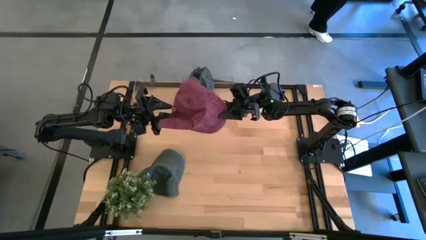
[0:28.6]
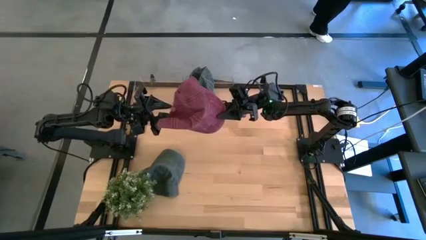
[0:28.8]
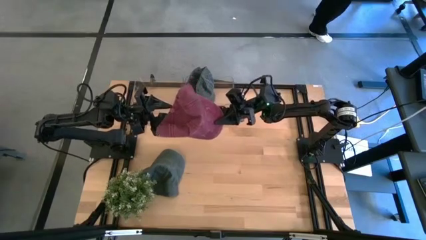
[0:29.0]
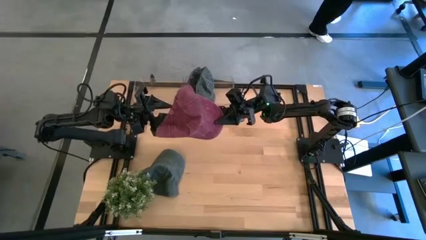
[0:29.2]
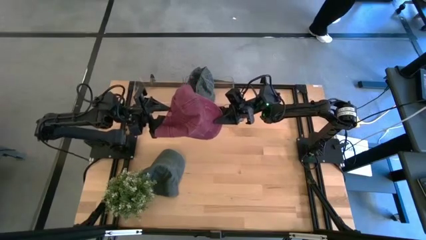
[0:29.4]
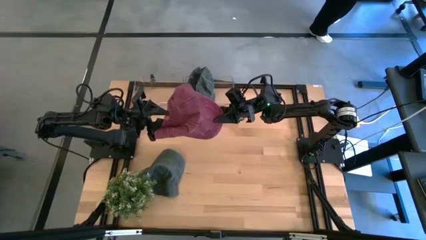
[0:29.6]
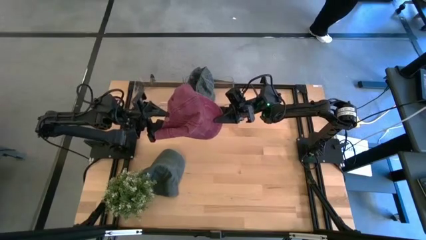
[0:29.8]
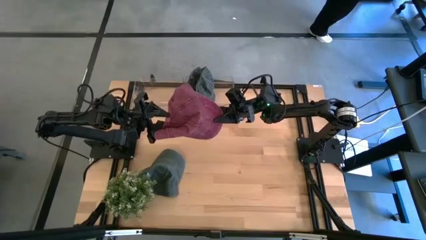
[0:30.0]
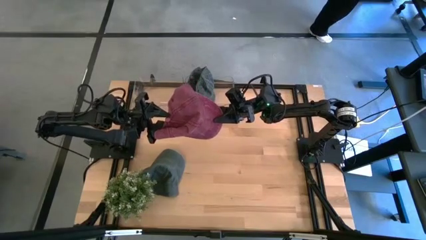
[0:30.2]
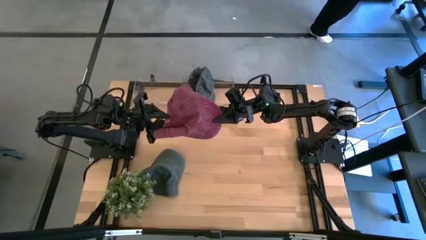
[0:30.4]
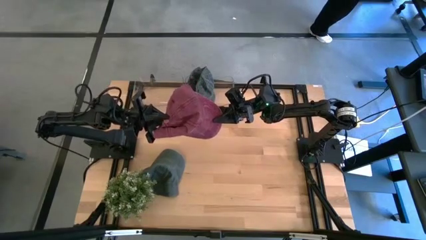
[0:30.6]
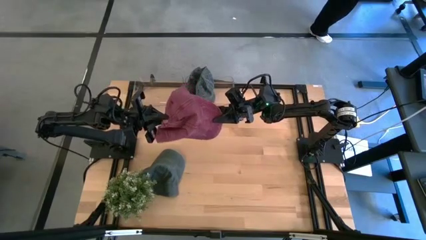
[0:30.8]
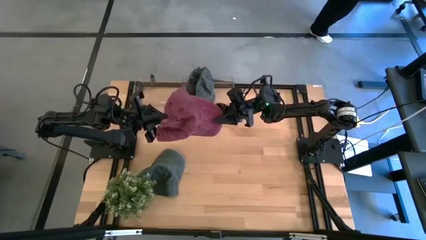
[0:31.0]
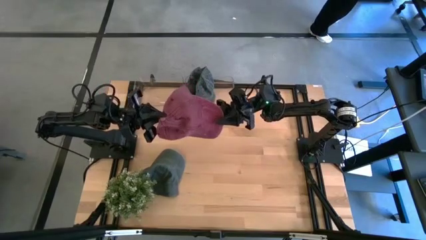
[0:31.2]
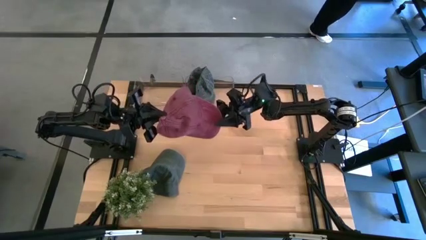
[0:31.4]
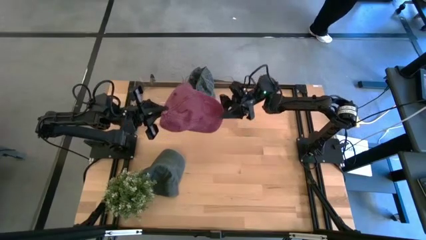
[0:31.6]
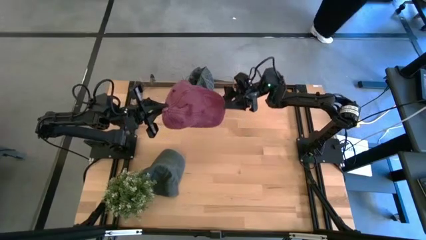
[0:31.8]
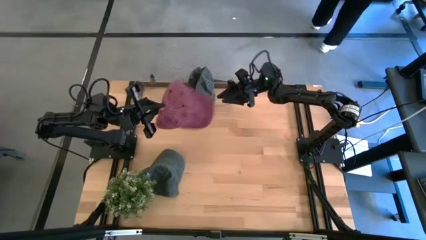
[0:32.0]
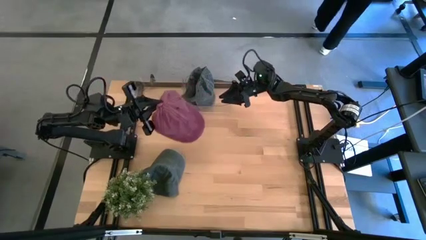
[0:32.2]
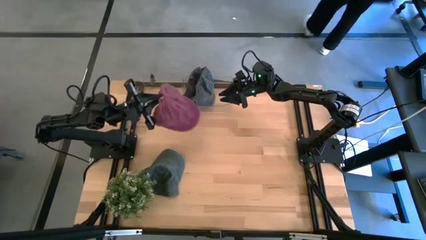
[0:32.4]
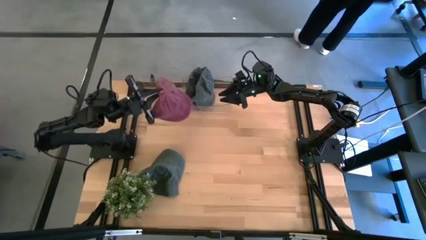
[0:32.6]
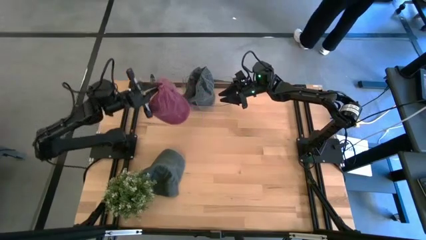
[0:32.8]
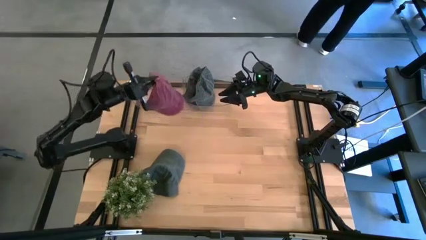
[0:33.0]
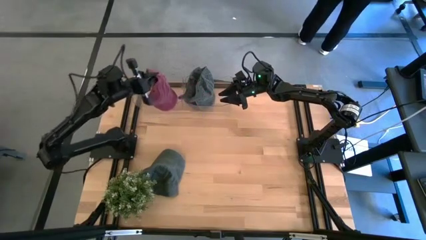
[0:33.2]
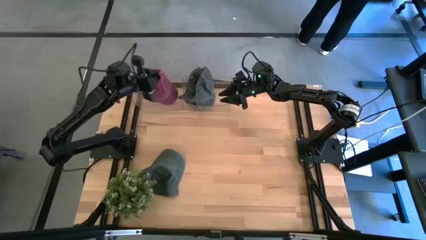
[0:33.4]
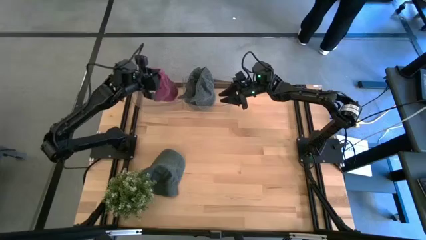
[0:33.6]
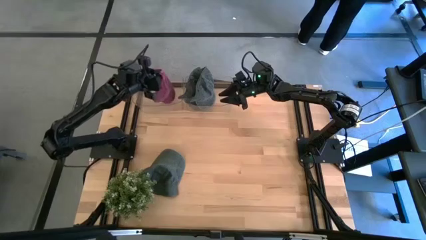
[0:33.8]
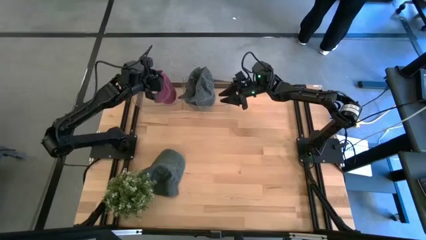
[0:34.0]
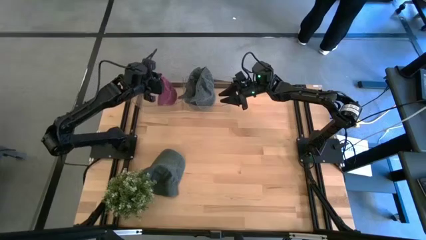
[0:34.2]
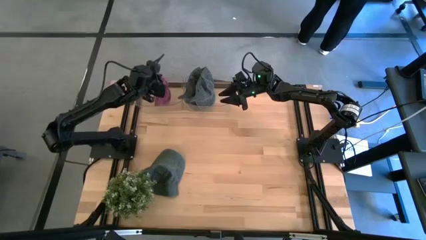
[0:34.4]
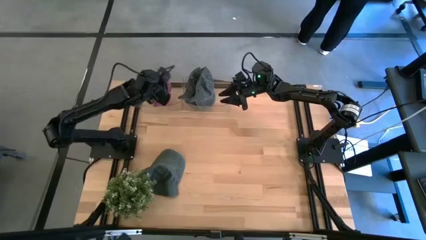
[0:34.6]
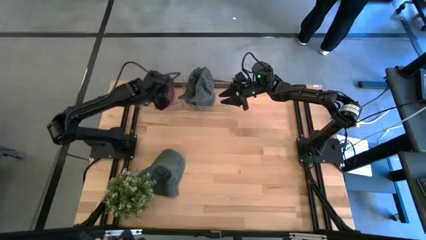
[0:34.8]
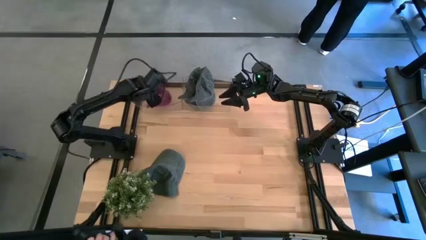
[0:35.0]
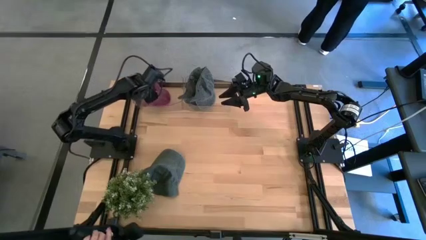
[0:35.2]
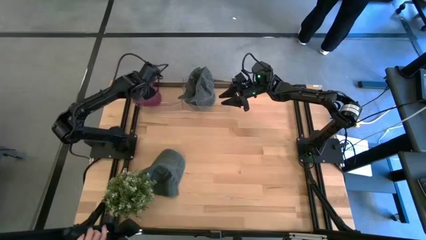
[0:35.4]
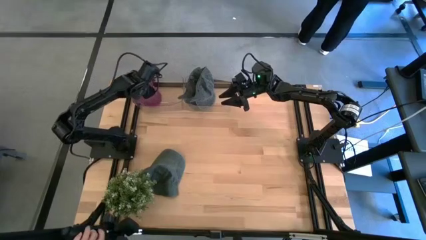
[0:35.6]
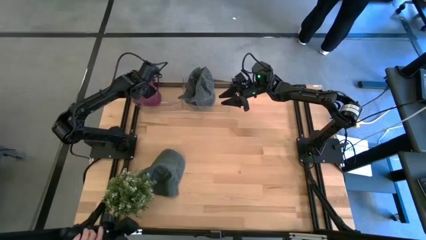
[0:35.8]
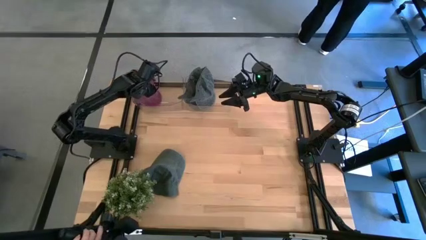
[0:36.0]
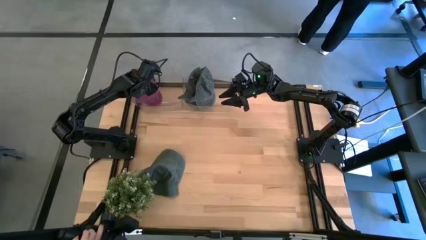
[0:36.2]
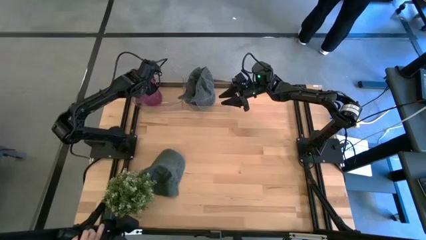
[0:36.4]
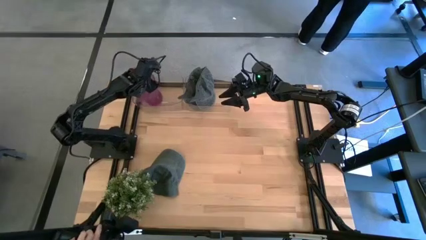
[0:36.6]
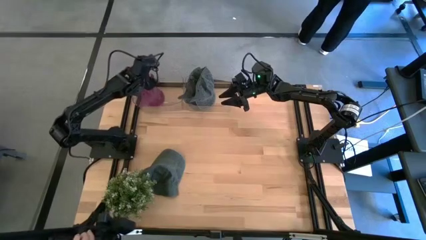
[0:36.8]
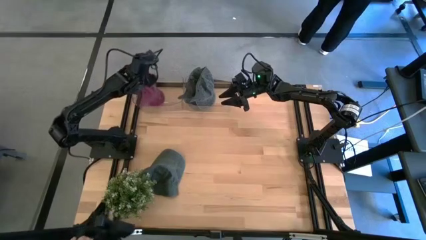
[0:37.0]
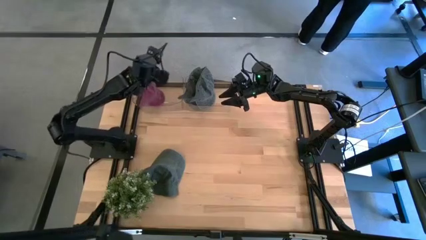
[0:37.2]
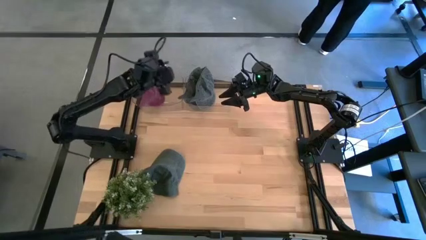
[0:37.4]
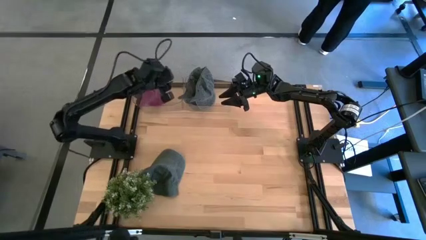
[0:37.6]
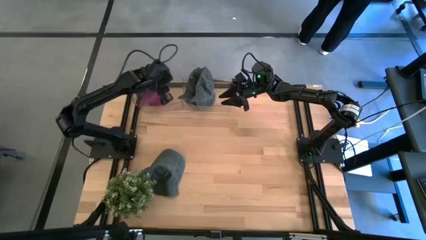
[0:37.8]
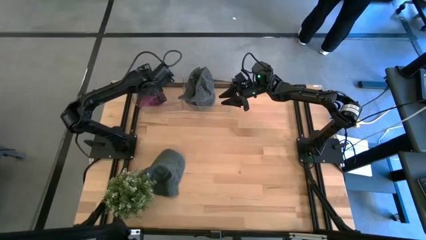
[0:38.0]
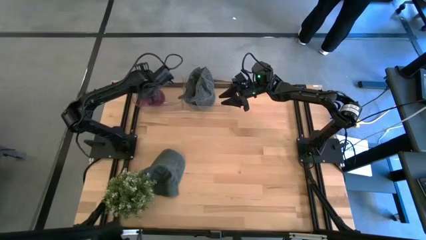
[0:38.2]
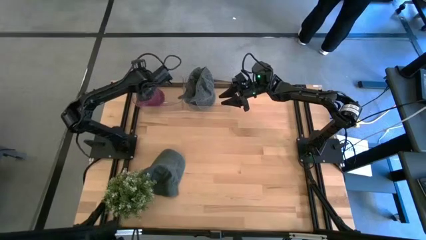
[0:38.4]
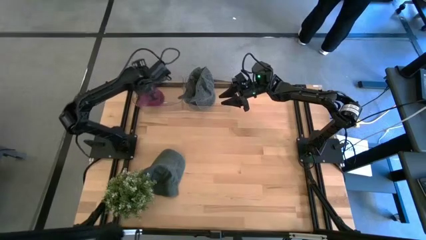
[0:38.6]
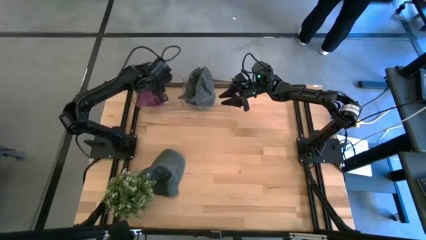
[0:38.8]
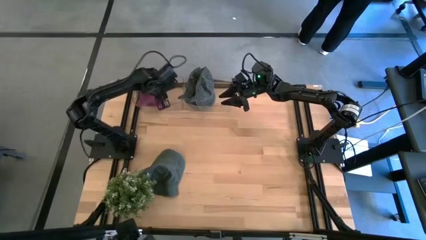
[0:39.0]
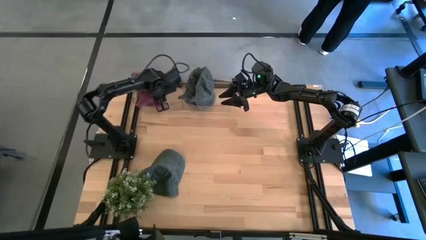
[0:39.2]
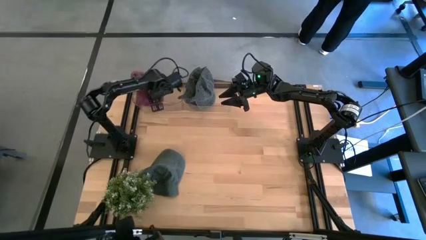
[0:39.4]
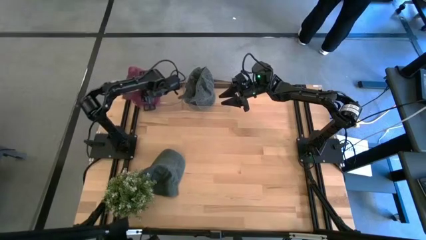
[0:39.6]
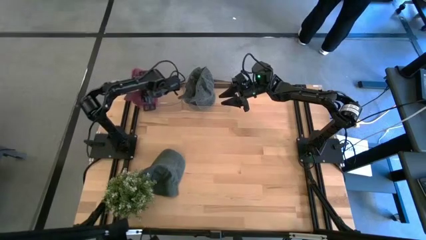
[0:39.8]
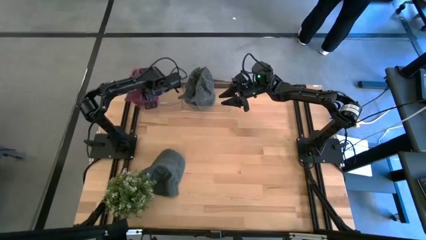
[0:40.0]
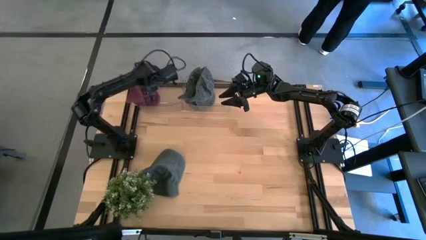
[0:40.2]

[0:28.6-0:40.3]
Task: Pick and place caps into container
Put the red cap into the left transparent container

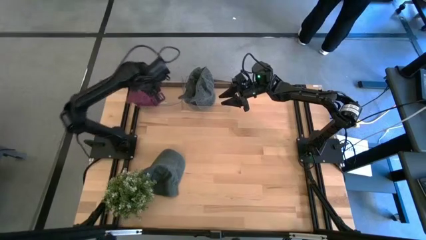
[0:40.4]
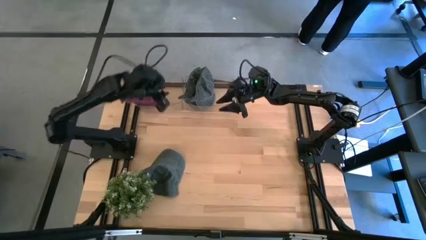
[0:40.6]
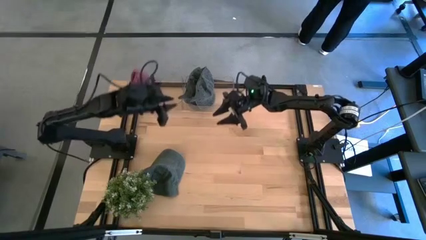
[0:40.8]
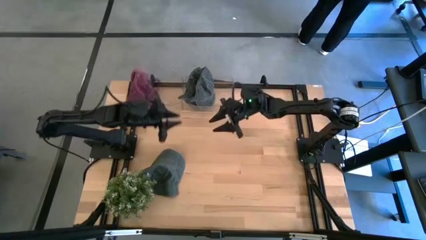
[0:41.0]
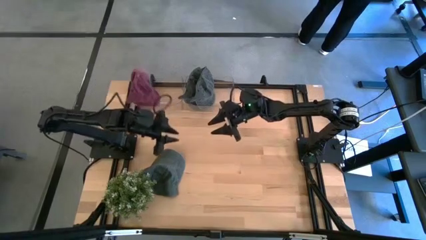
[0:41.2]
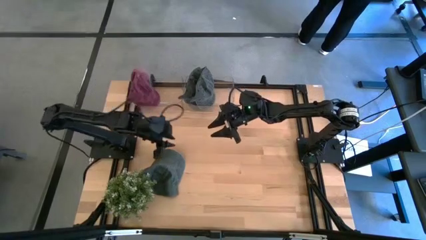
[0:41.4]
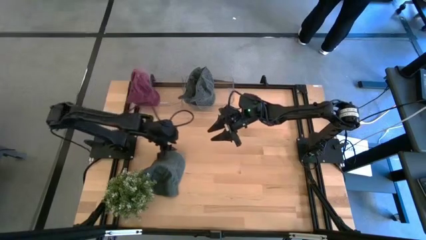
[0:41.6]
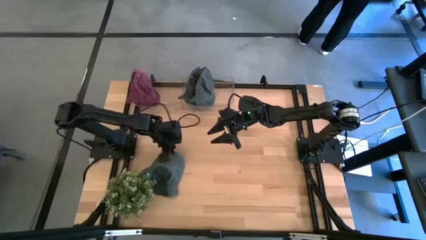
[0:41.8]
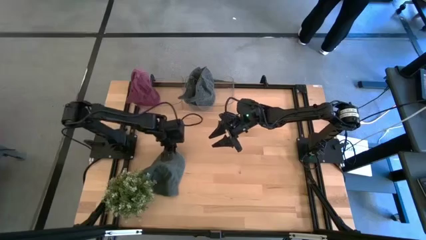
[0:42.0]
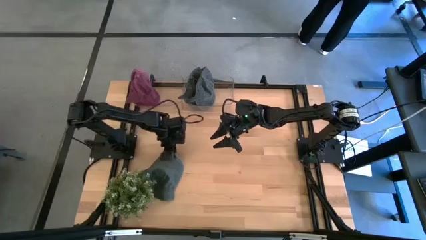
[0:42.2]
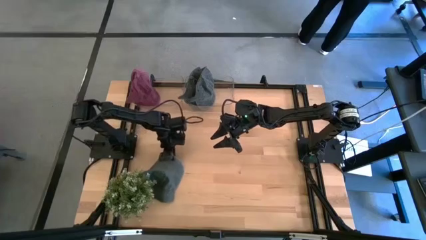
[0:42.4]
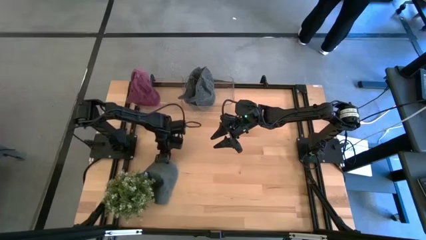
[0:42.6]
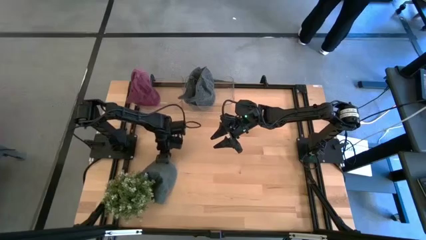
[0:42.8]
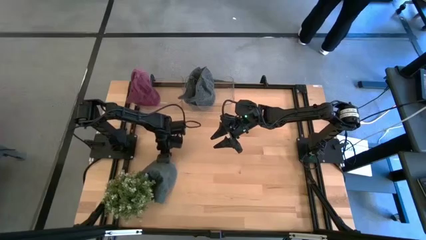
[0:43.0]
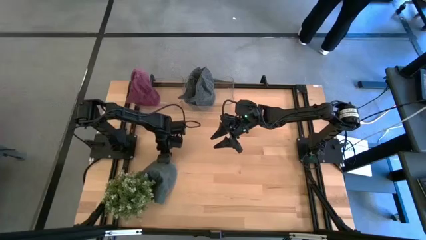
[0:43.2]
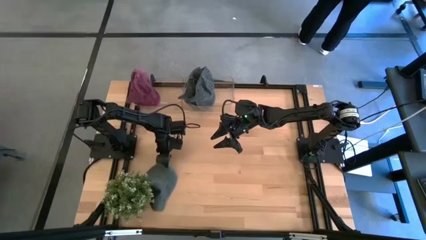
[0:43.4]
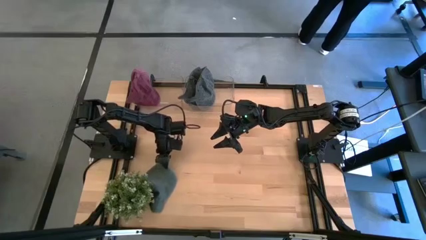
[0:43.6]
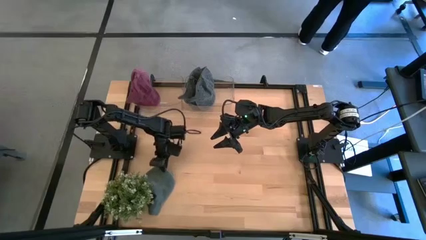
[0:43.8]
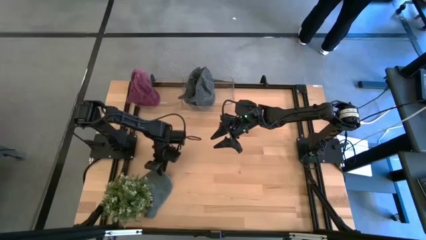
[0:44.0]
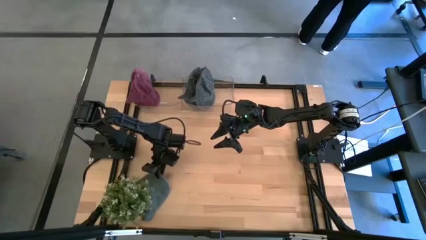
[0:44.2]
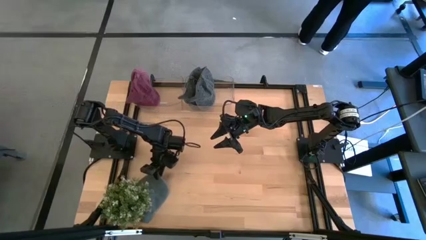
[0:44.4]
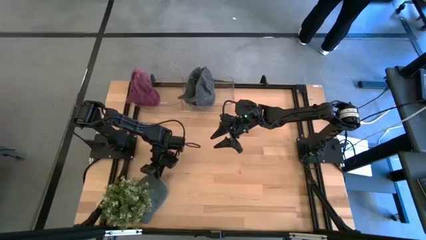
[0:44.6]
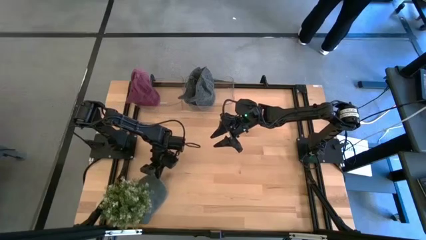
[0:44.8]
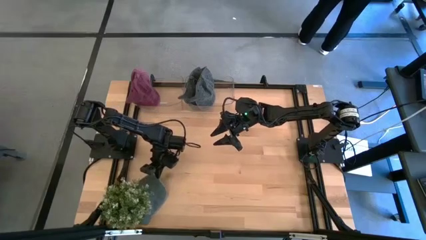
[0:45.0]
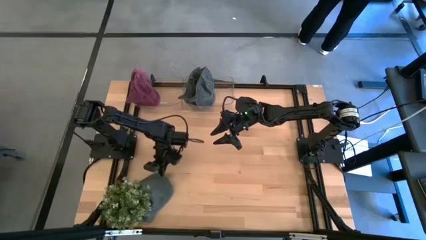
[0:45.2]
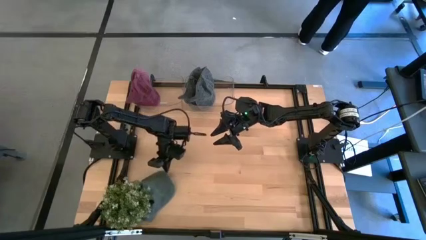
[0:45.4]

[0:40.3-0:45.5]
Put the blue cap into the right transparent container
